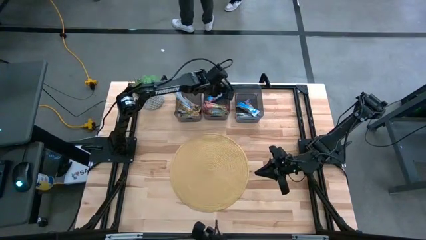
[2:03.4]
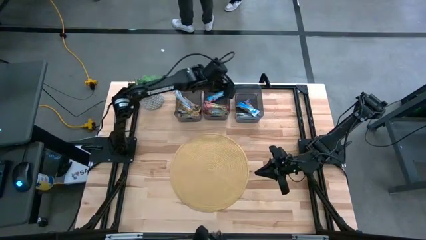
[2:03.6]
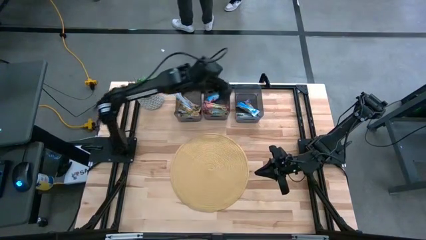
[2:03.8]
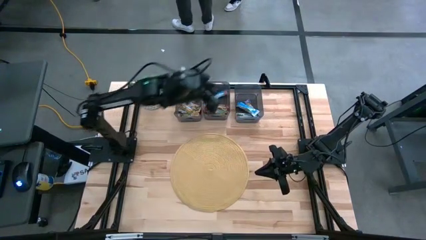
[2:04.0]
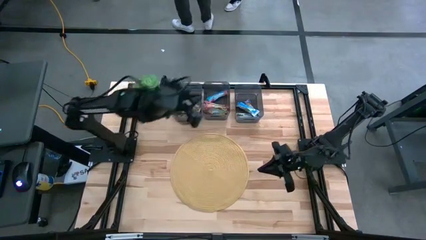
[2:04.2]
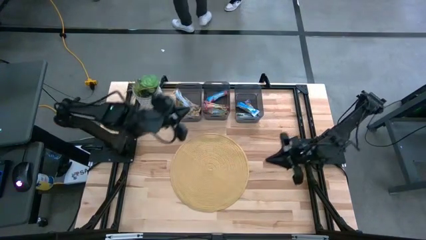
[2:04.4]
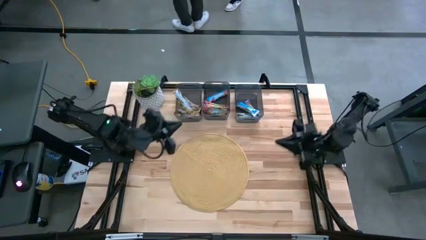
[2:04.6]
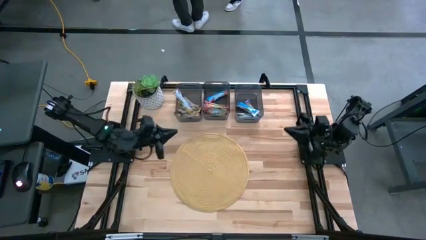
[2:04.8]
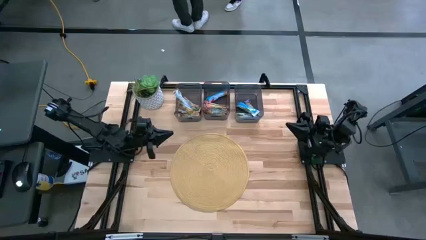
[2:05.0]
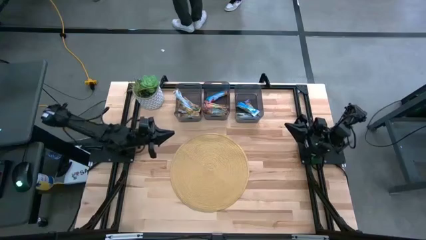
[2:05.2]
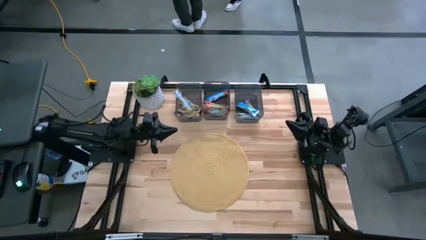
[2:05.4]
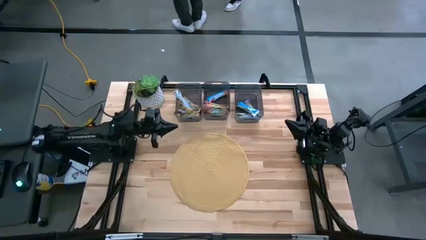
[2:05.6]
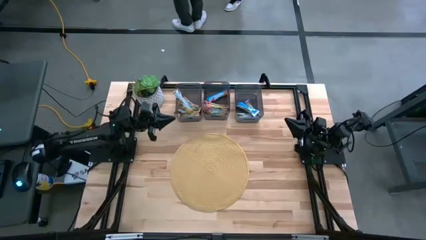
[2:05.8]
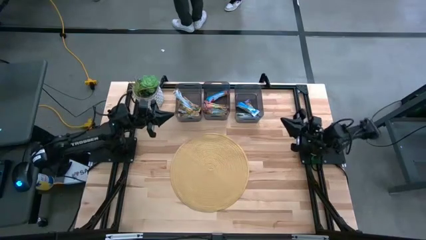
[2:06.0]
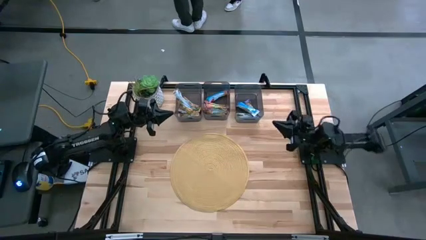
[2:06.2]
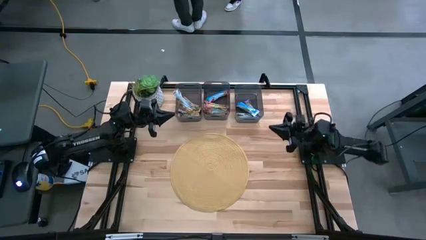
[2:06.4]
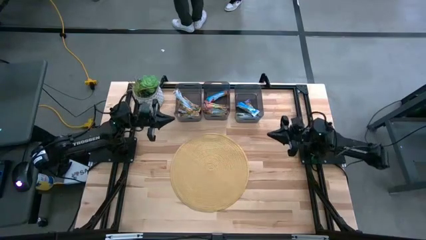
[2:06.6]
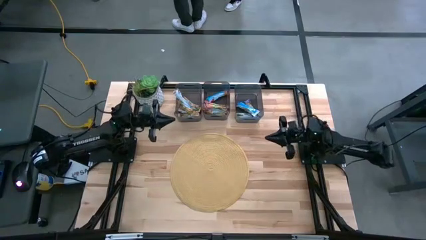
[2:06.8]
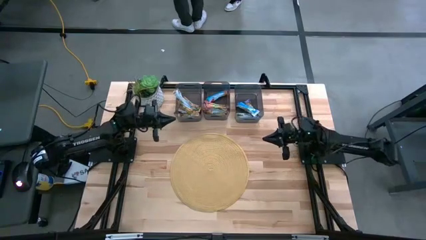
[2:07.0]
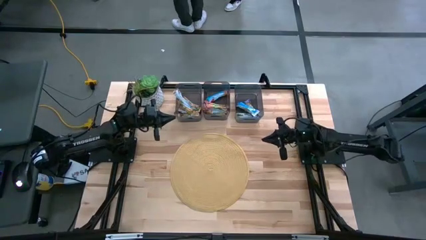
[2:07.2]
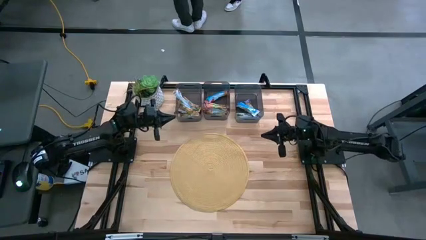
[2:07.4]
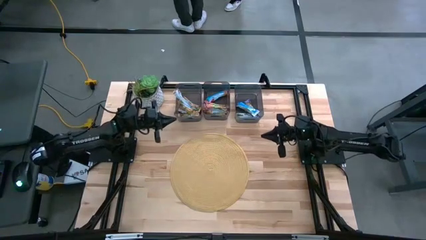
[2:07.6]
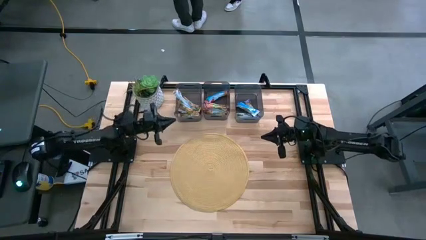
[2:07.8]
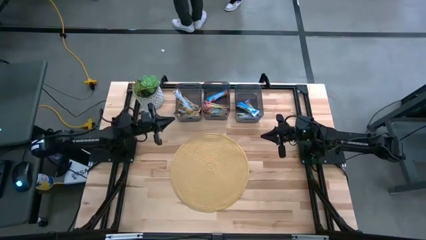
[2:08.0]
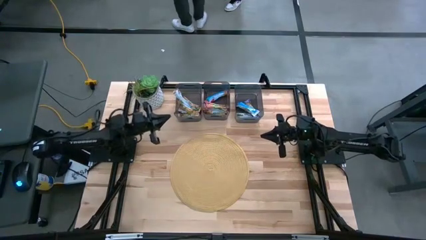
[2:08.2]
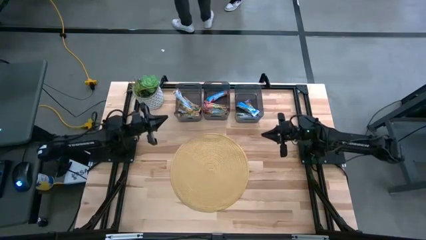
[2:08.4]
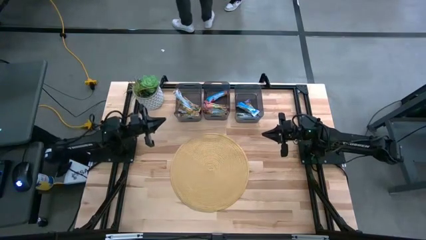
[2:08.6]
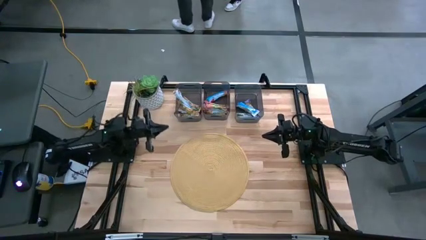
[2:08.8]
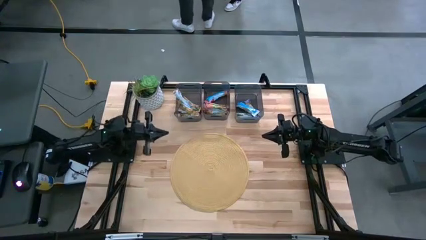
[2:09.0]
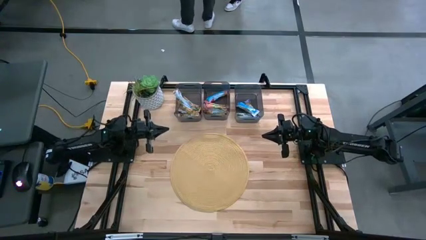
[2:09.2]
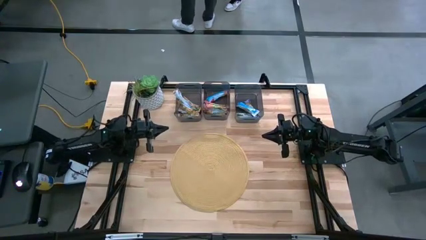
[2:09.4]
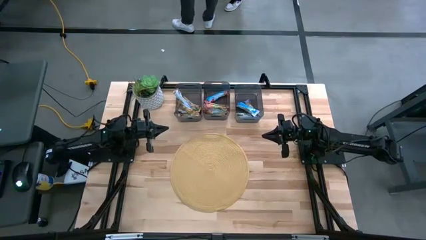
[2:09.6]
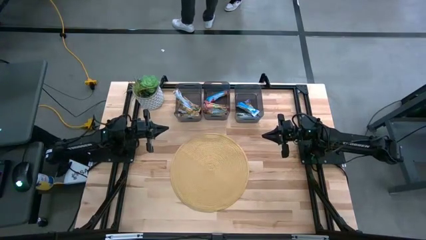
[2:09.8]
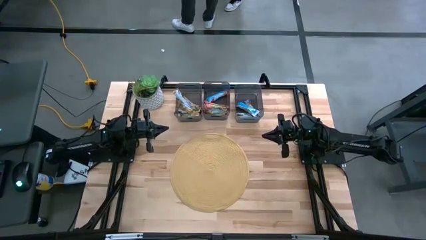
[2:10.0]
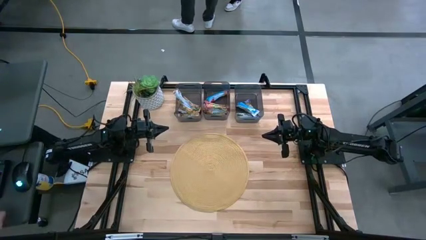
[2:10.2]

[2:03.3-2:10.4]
Task: Pick and place Granola Bars by type
Return to Home Position

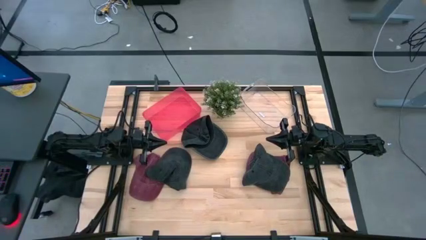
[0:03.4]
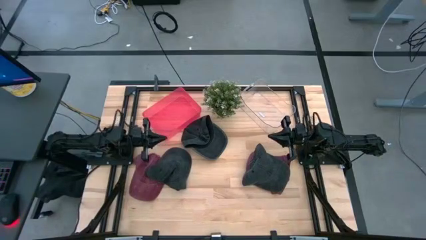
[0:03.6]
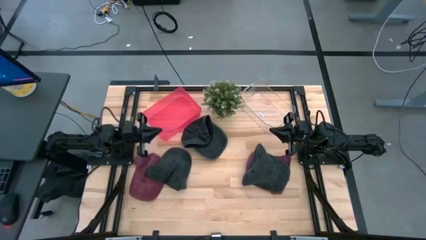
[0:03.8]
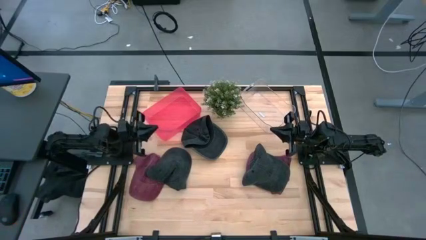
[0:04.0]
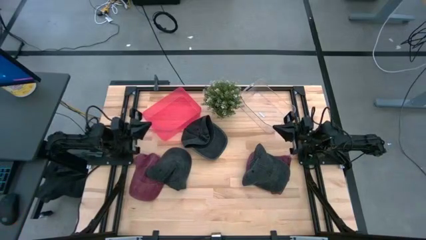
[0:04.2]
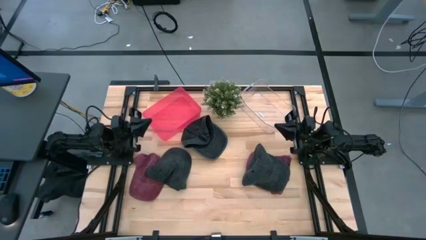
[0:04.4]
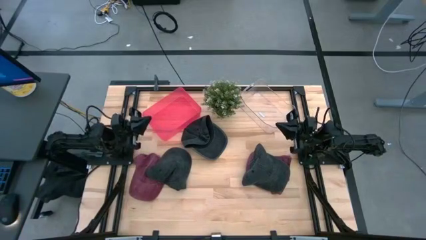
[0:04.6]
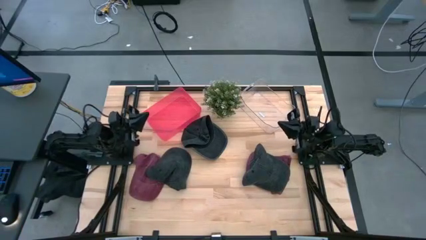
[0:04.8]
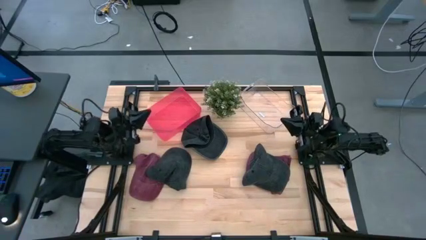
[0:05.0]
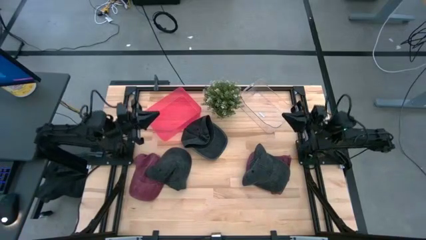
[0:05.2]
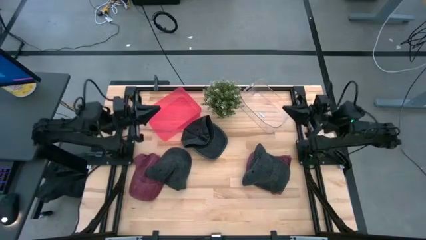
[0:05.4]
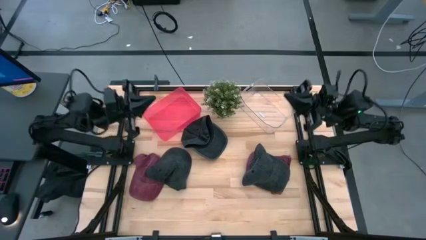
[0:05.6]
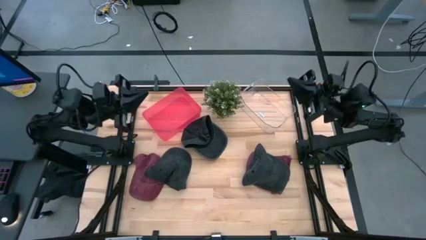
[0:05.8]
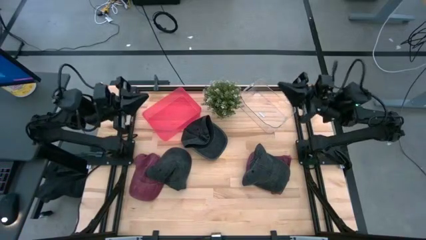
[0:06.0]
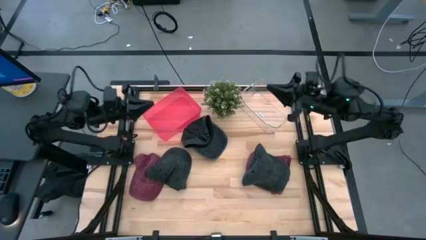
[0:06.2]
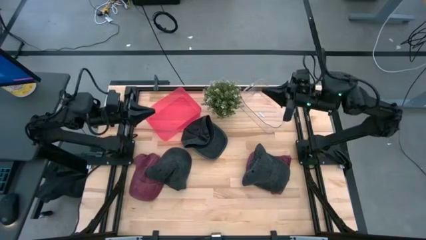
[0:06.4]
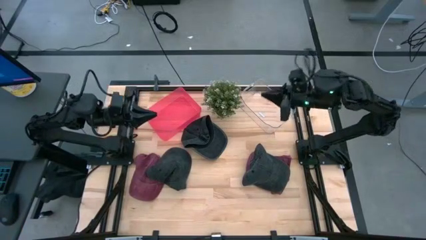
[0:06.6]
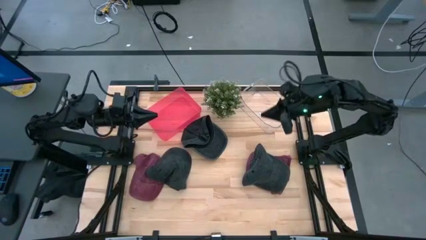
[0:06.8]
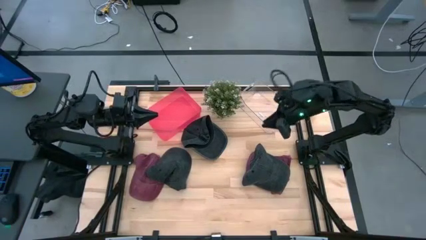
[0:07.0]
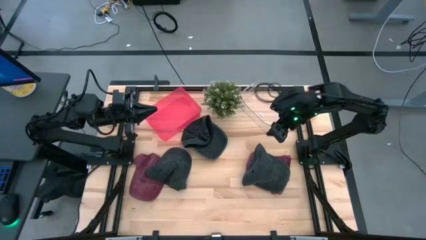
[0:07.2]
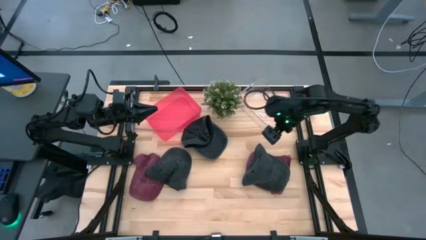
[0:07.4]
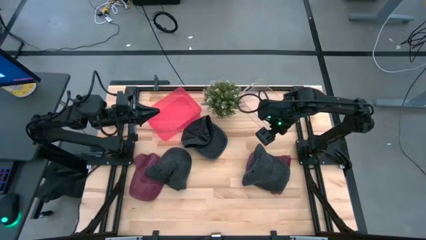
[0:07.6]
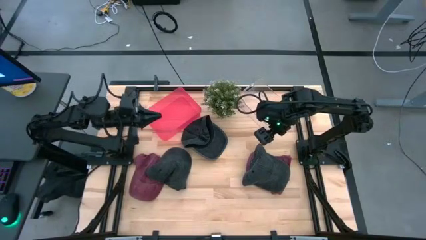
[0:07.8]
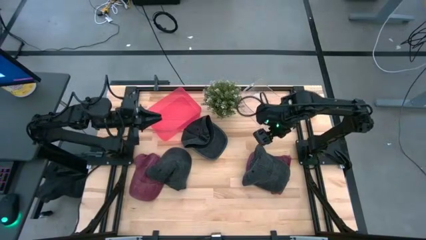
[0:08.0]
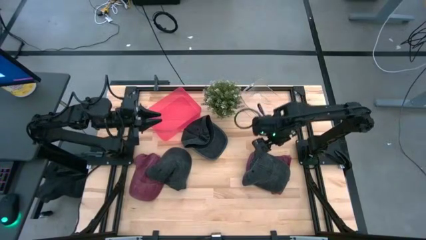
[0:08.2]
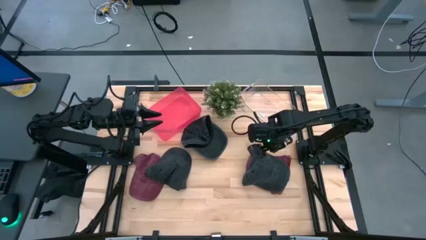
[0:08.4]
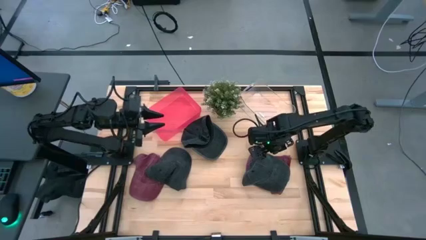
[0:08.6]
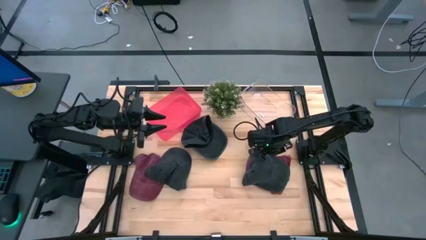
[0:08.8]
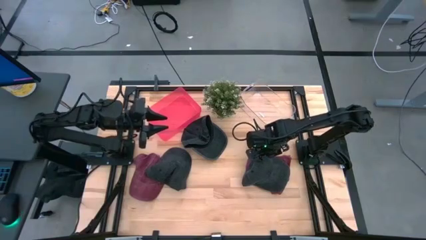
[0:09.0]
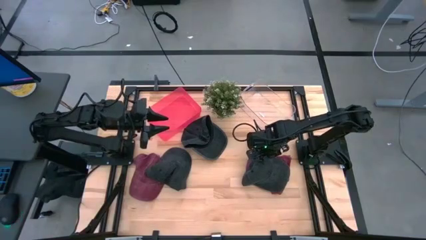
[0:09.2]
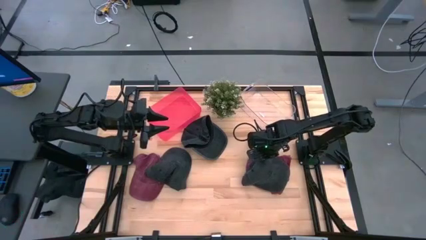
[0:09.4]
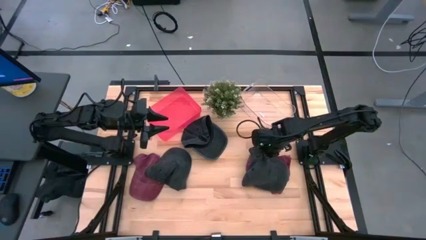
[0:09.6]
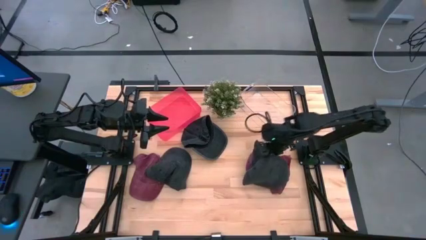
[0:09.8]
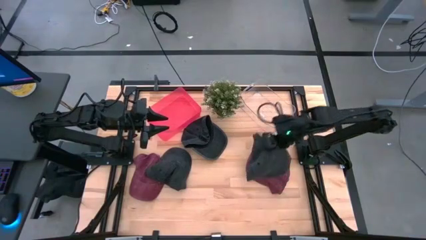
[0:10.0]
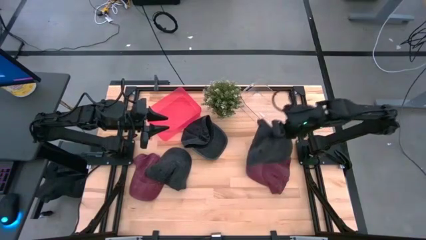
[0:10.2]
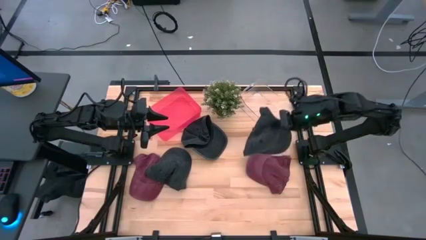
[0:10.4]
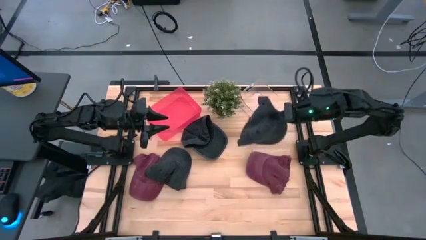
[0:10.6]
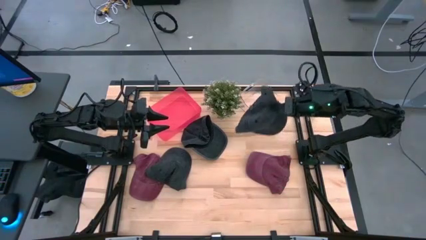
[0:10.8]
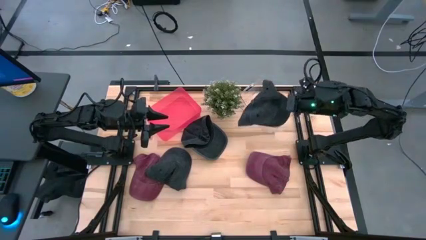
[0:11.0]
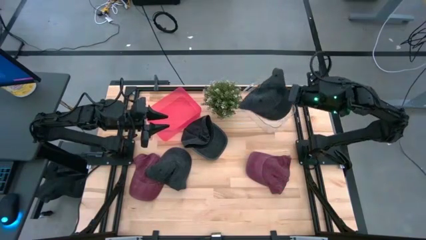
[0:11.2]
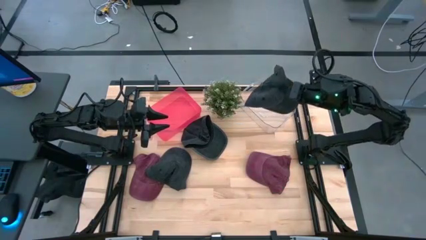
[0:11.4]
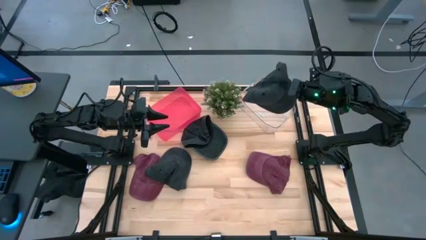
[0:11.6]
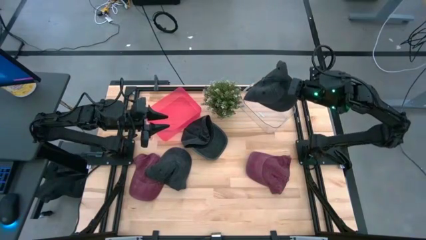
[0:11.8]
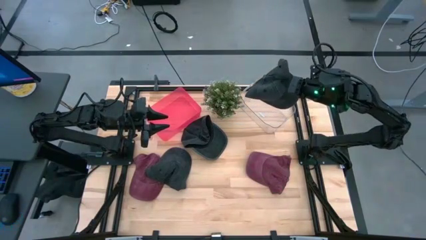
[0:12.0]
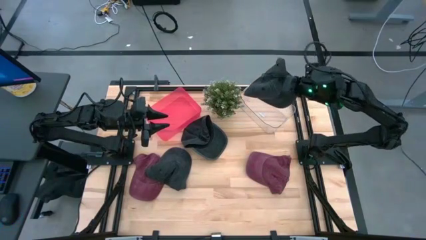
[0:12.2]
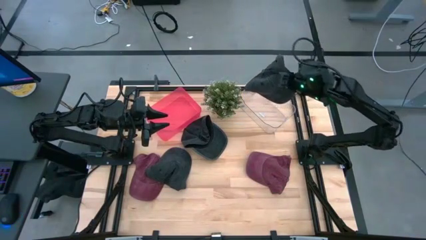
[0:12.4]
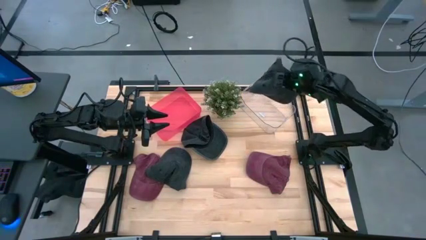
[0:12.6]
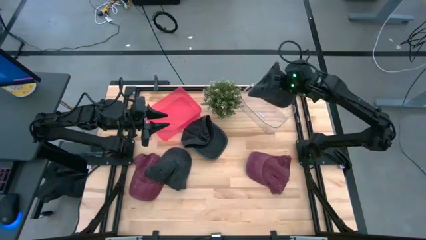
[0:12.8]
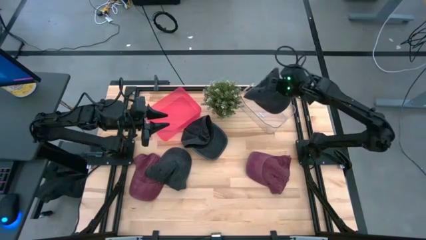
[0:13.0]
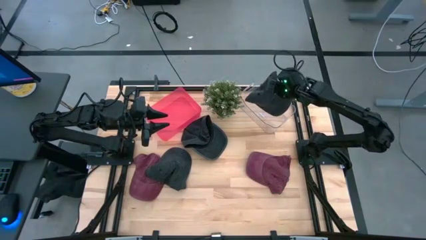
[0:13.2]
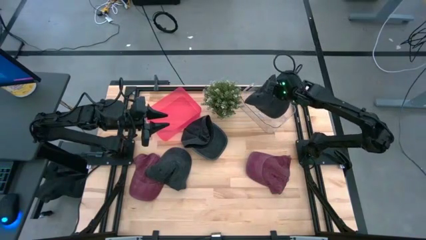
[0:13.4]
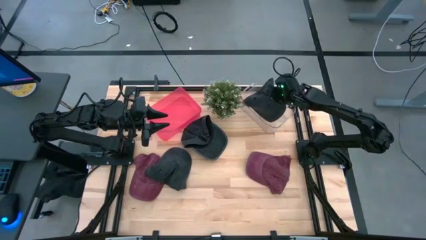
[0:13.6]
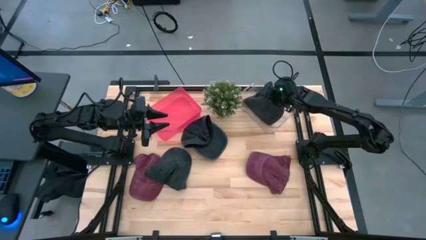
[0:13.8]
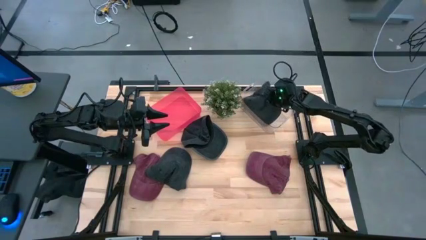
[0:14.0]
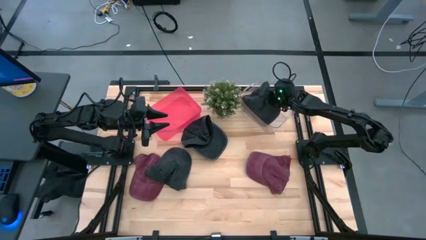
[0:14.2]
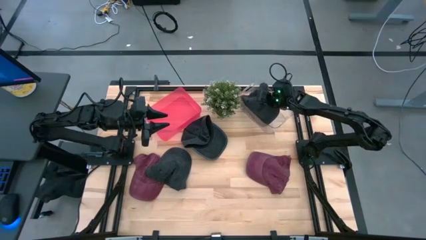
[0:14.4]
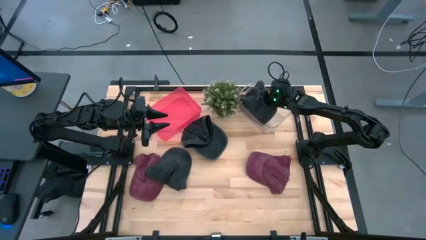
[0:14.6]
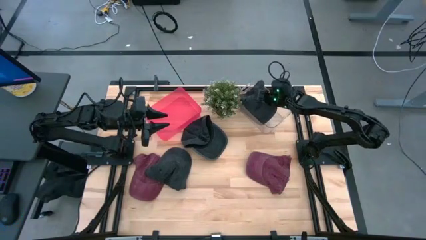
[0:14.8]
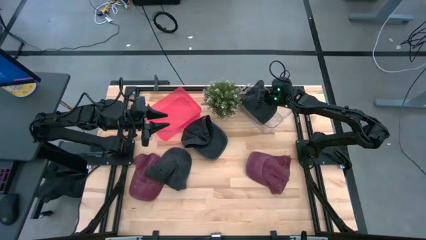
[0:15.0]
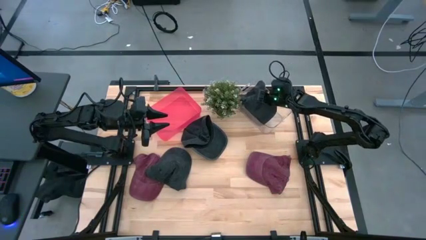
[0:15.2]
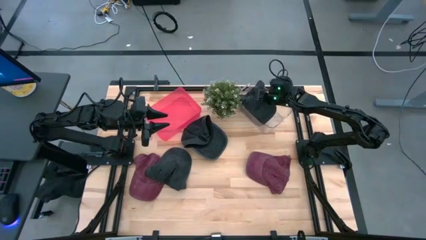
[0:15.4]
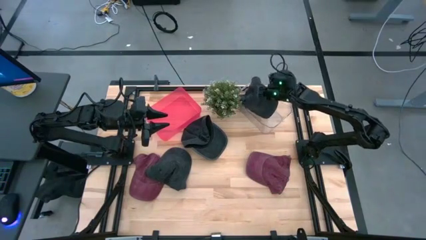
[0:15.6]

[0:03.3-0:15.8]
Task: Pick & Place hat
Put the right black cap into the transparent bin
